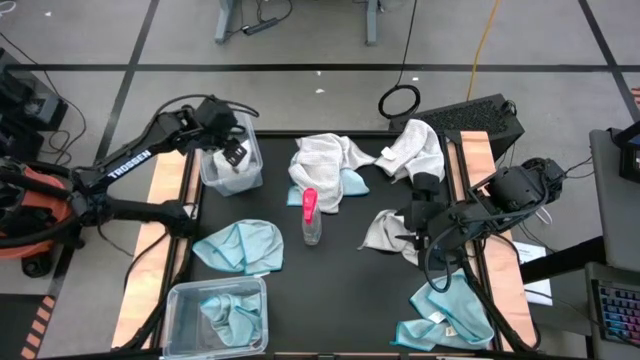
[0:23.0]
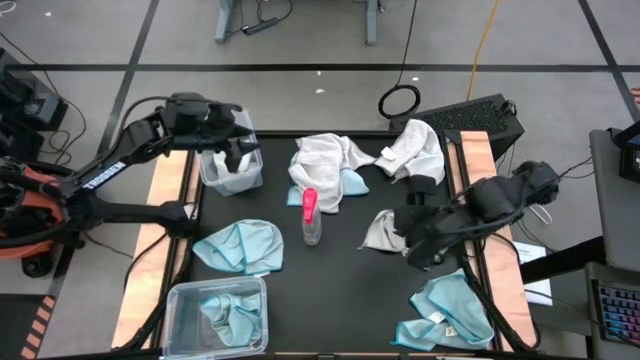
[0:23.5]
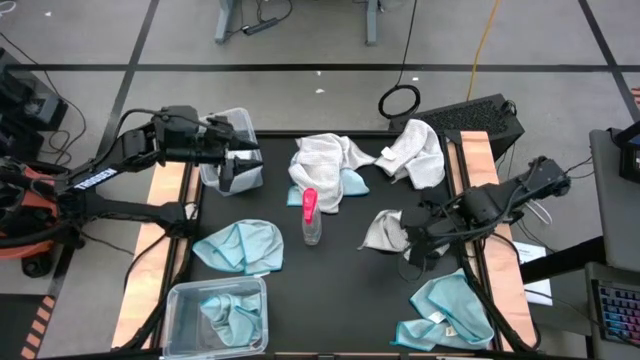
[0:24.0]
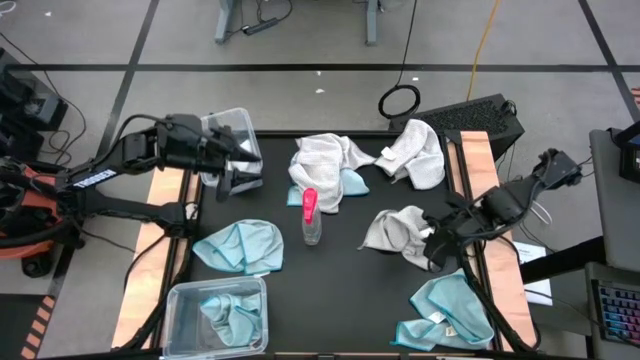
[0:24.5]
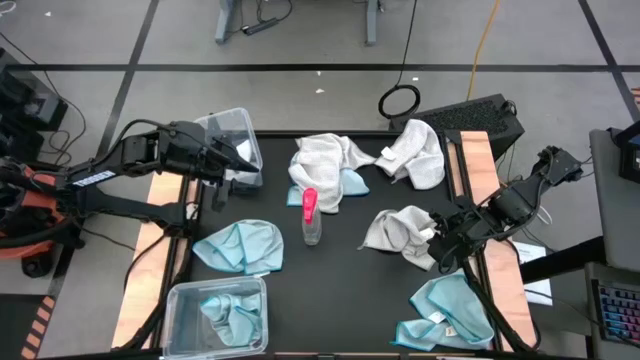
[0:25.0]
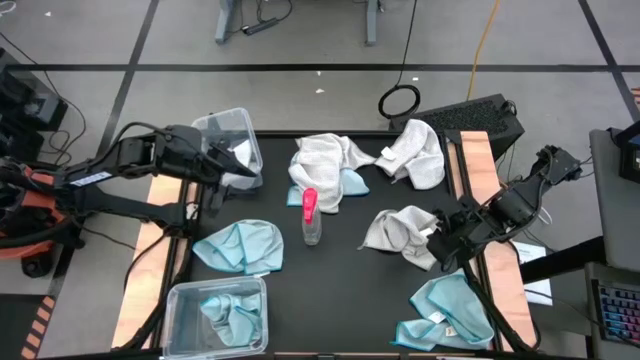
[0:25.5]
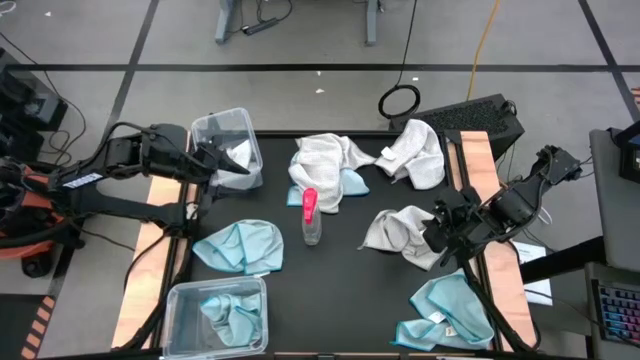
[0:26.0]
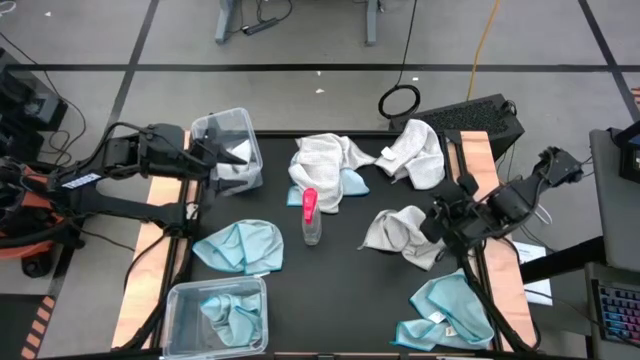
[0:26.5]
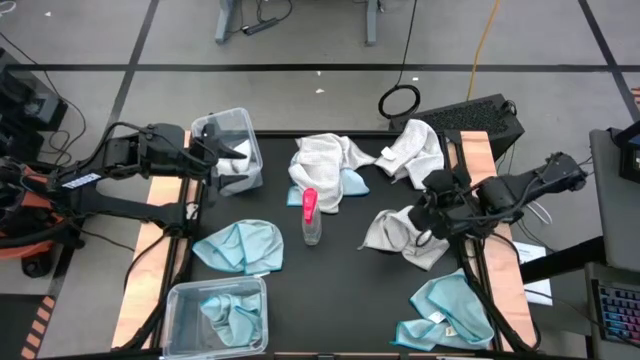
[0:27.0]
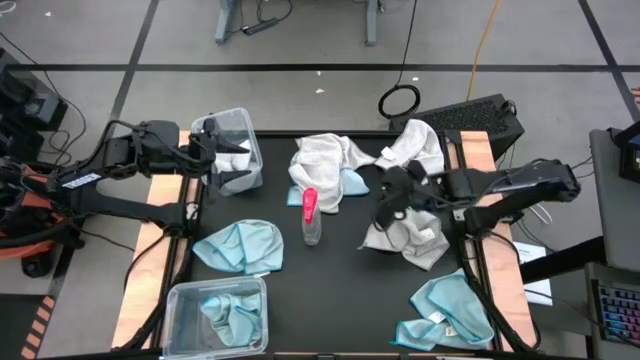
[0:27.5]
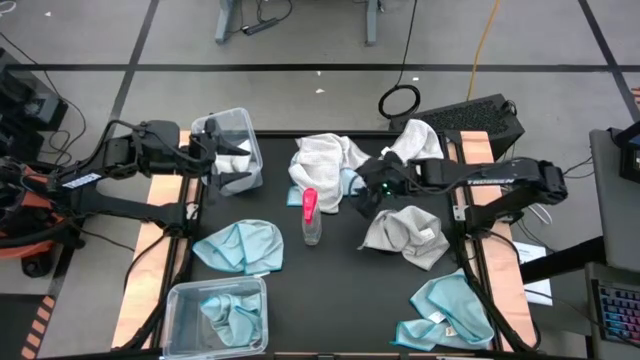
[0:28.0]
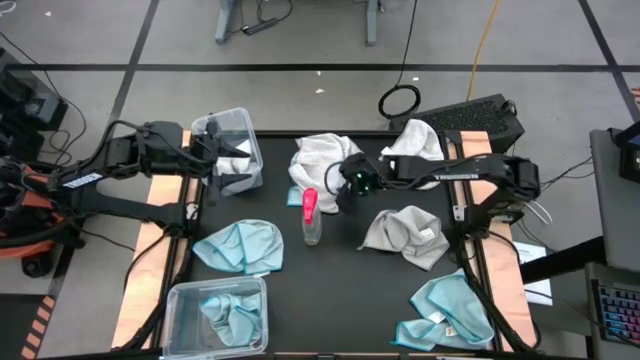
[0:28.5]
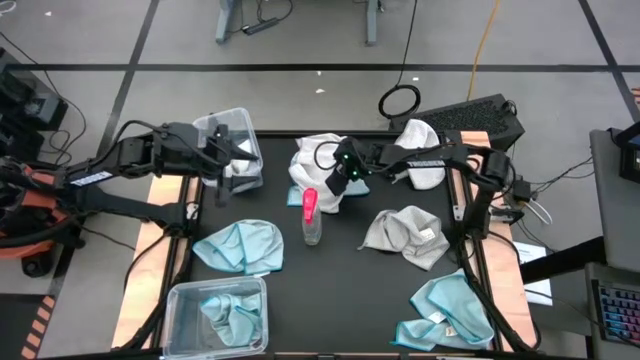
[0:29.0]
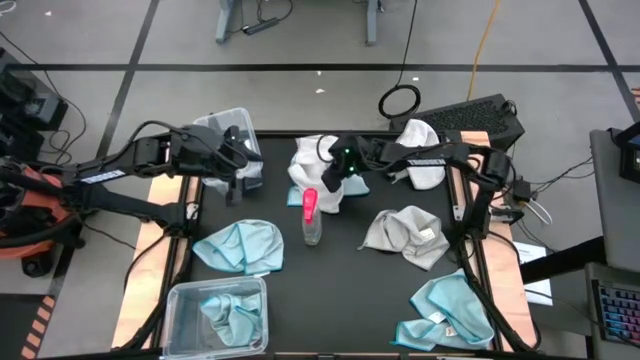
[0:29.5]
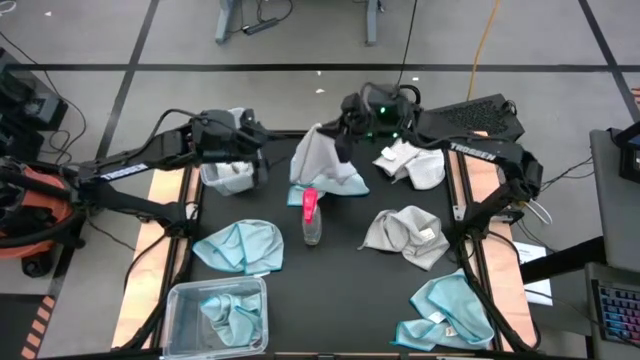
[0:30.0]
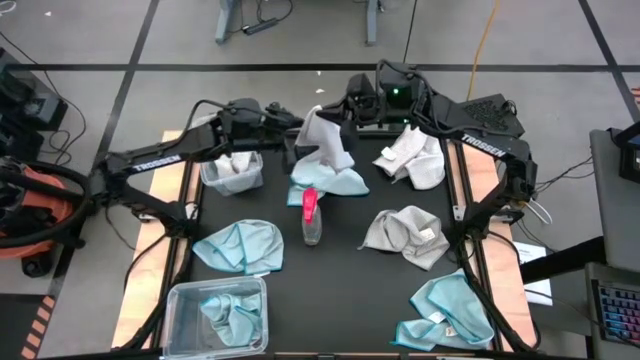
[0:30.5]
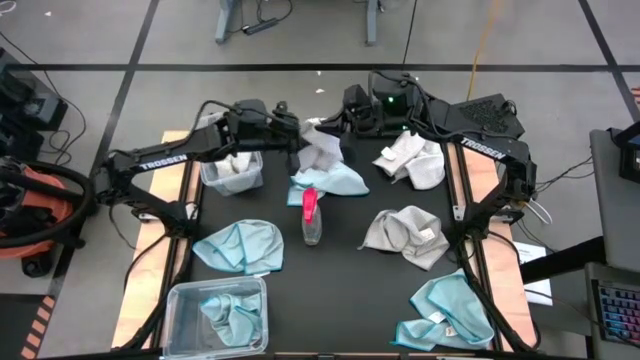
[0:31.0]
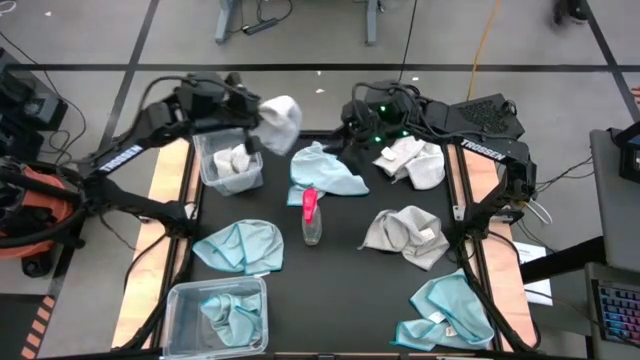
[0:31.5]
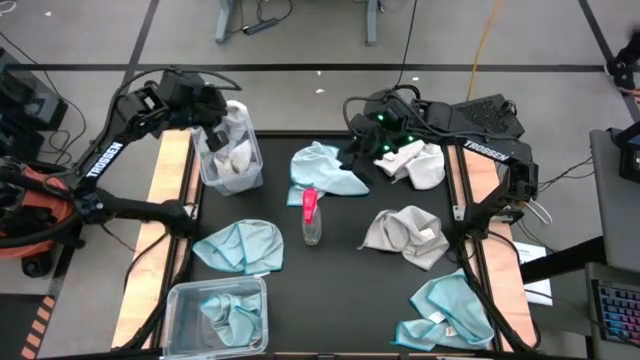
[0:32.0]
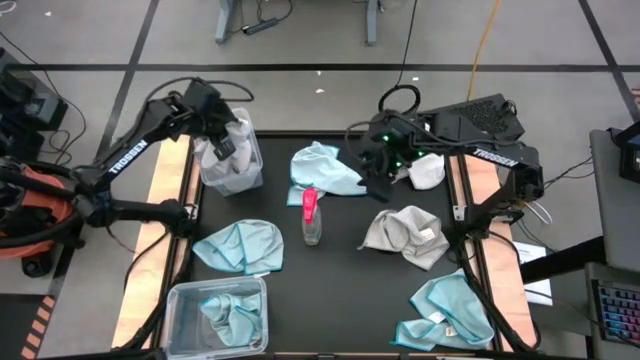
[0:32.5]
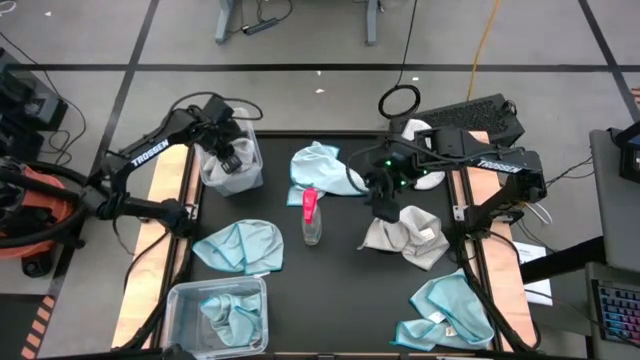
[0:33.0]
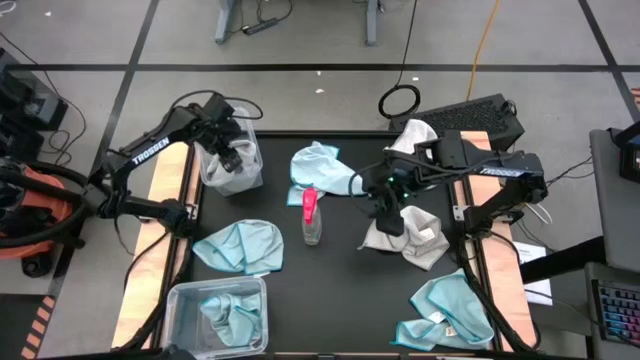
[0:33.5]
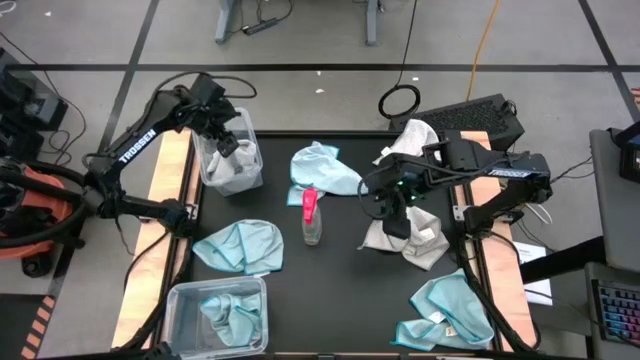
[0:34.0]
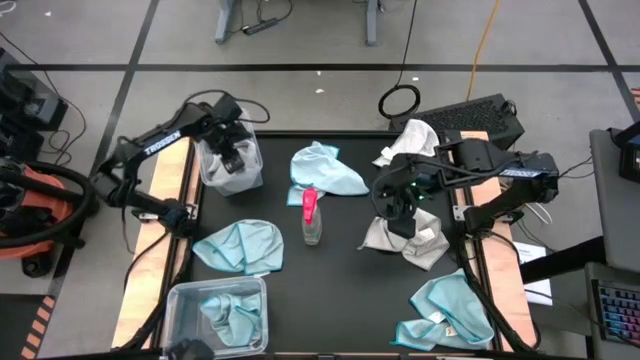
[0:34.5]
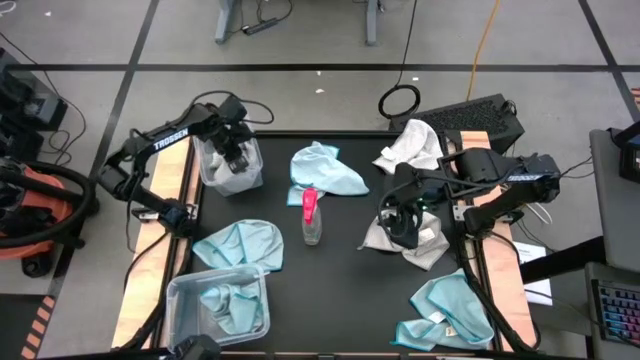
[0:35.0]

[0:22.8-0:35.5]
Task: Sort microfiber towel by color & place in baskets
Put the gray towel into the top transparent bin

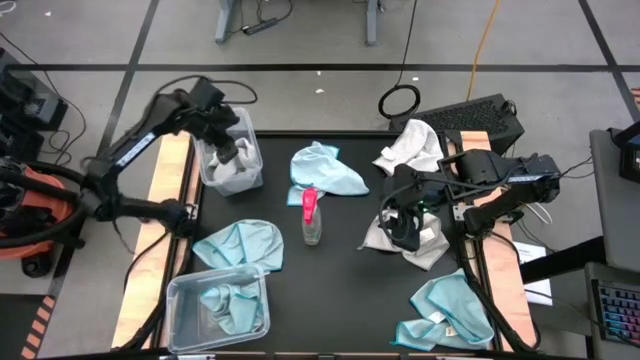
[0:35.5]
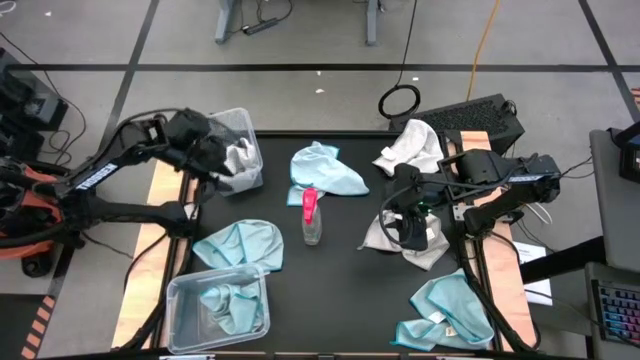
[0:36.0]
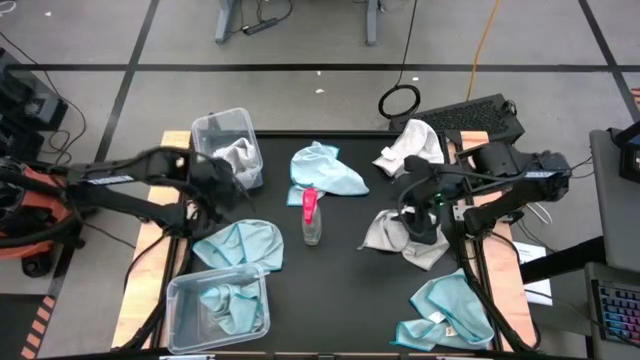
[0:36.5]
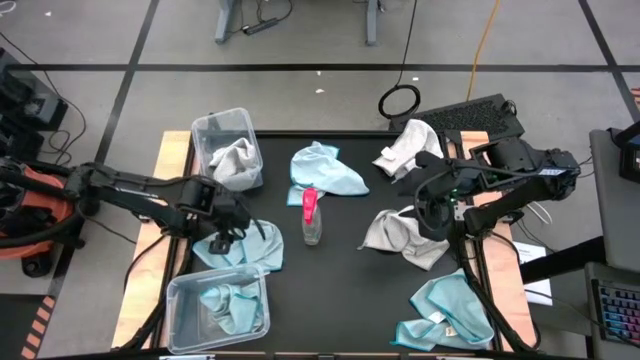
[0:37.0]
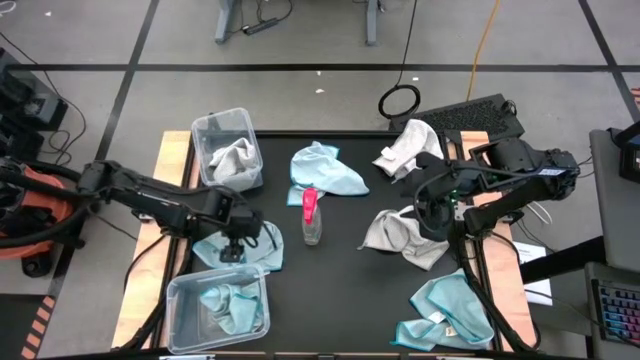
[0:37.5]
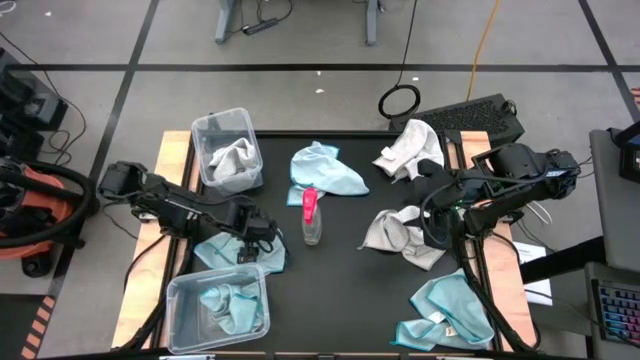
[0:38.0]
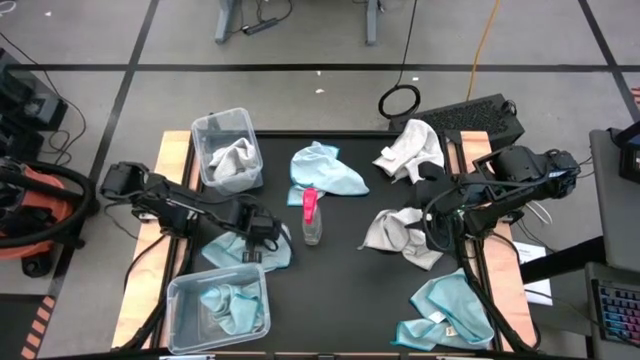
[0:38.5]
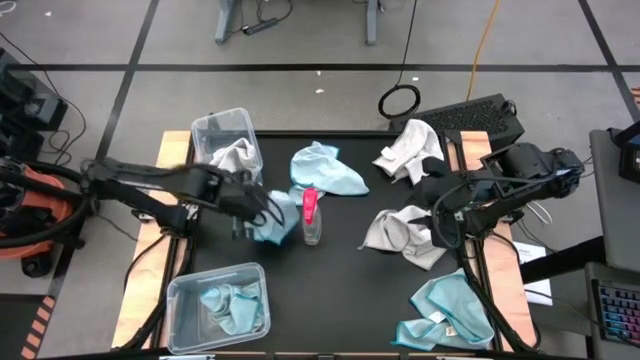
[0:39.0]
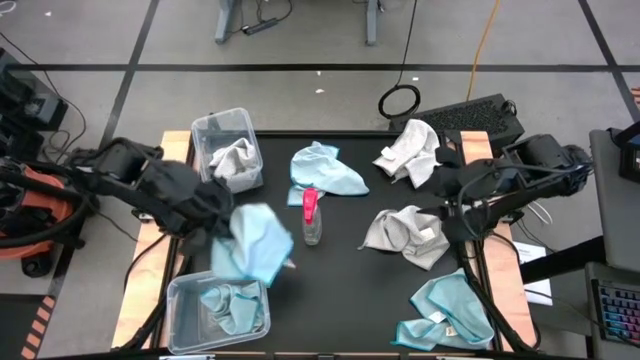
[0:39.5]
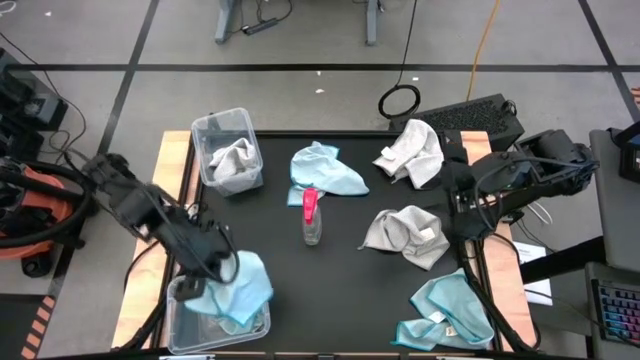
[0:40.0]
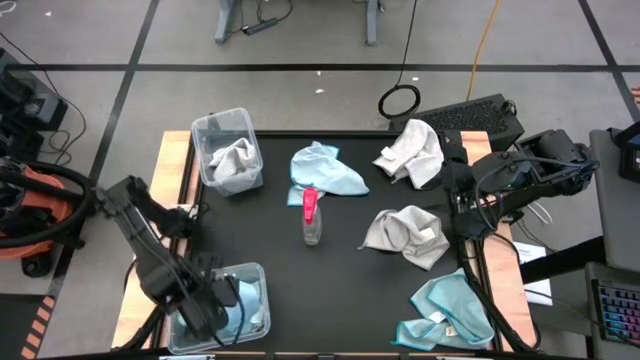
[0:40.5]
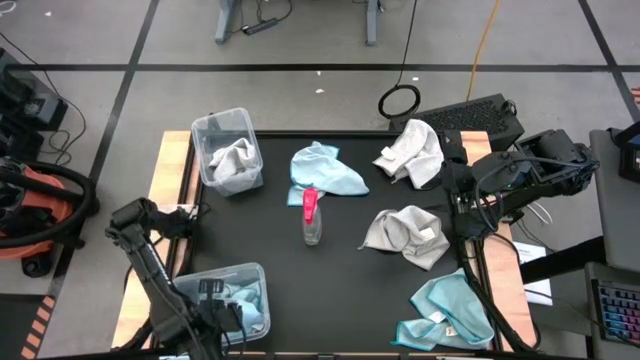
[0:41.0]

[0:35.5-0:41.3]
Put the blue towel into the bottom transparent bin

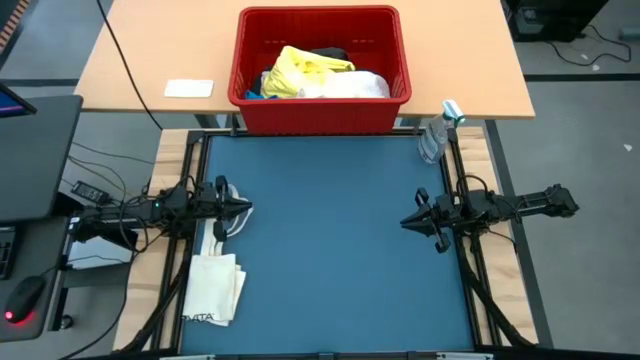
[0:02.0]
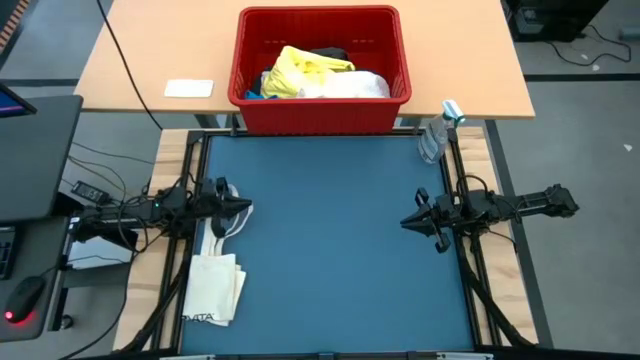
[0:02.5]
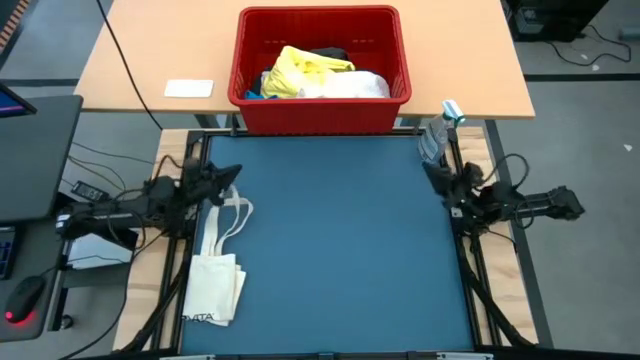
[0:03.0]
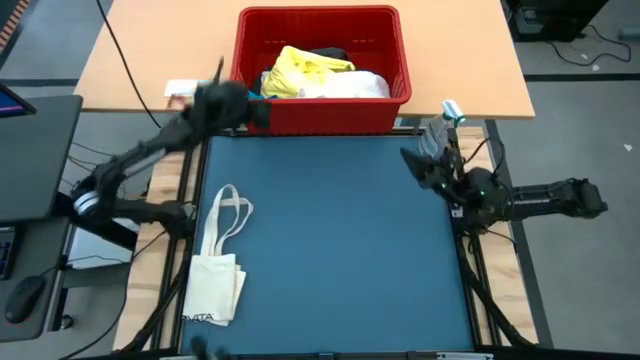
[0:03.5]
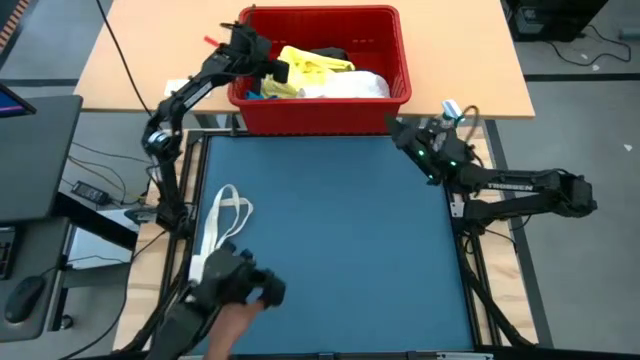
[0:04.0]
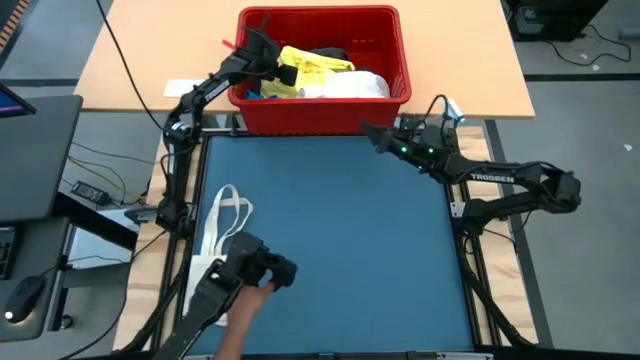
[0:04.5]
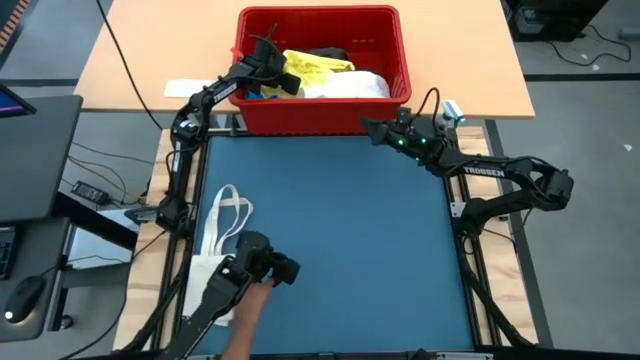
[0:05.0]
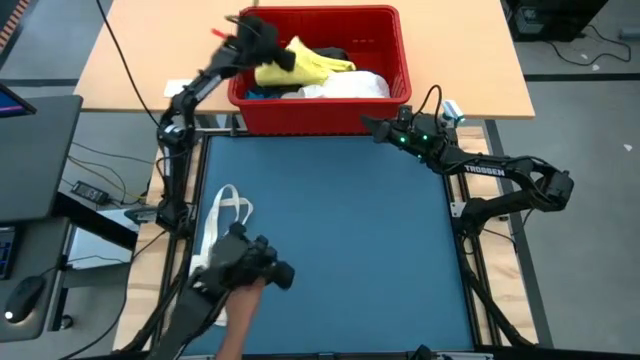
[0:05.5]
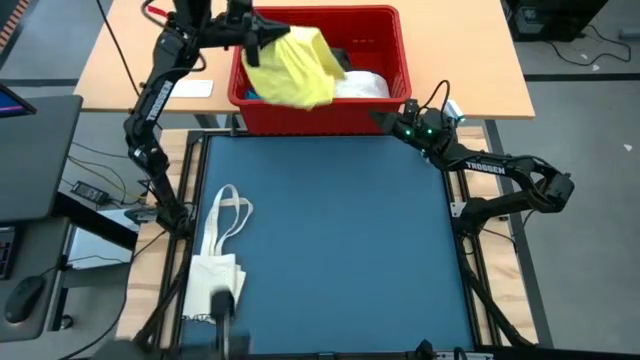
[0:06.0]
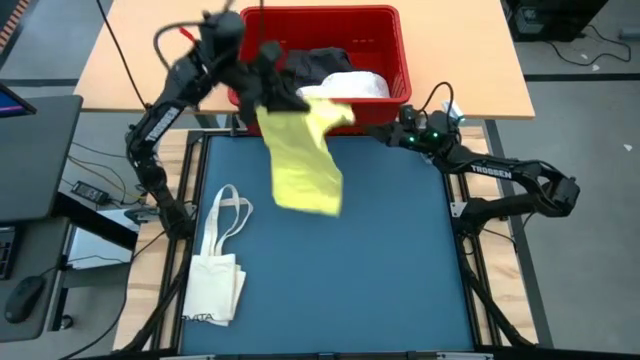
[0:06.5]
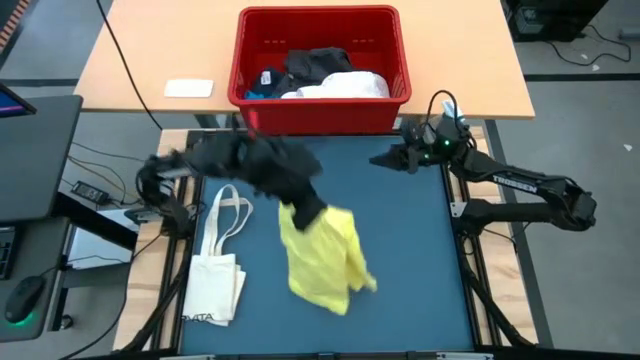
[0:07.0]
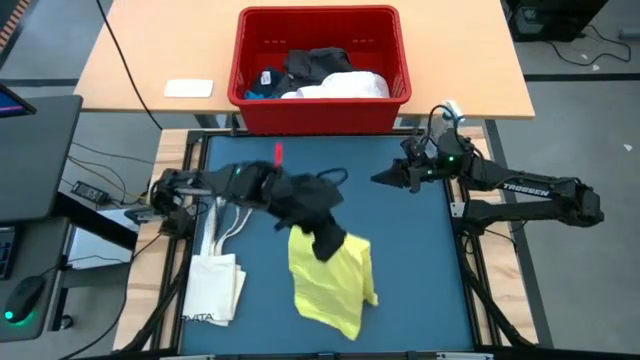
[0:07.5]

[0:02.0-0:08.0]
Task: Fold laundry
Remove the yellow shirt from the red bin
